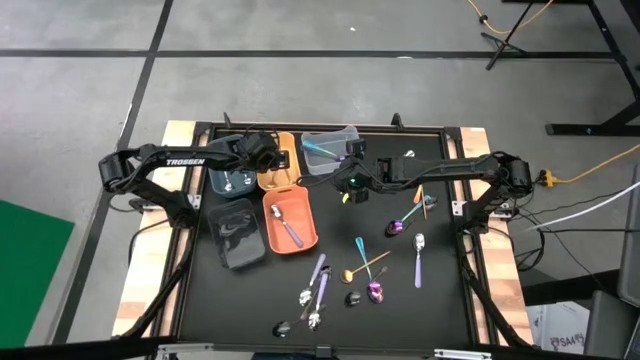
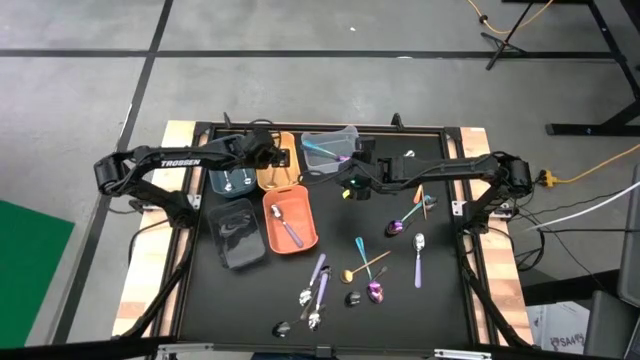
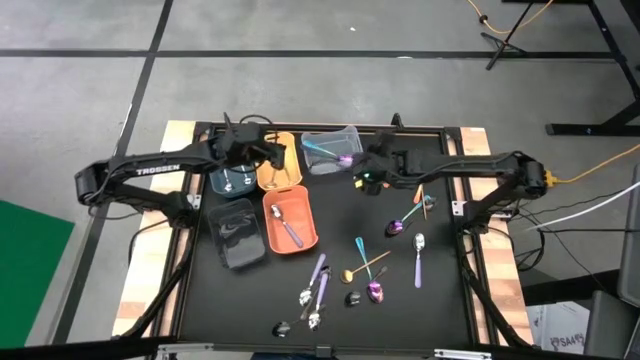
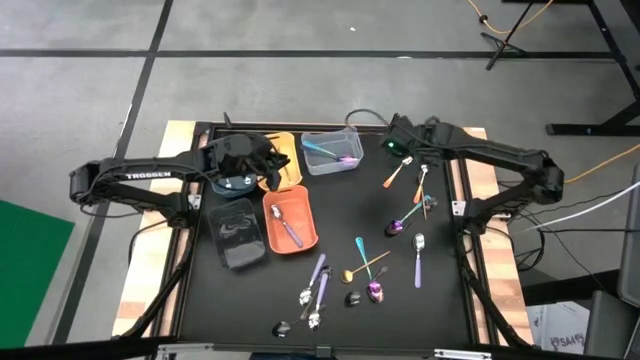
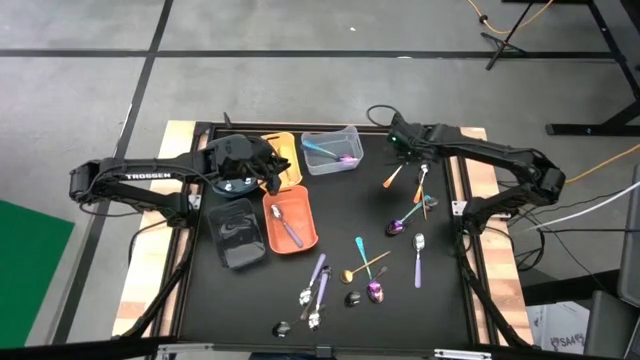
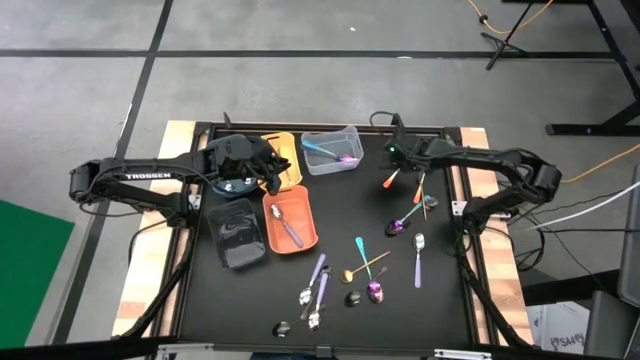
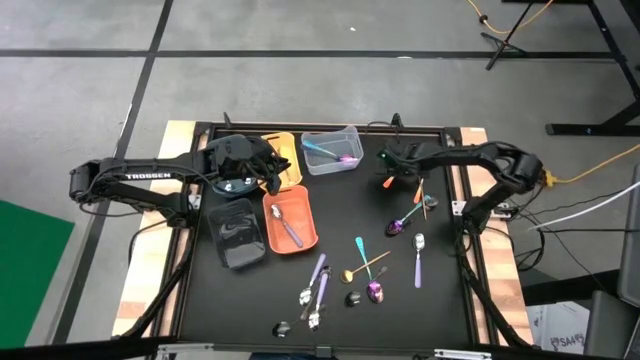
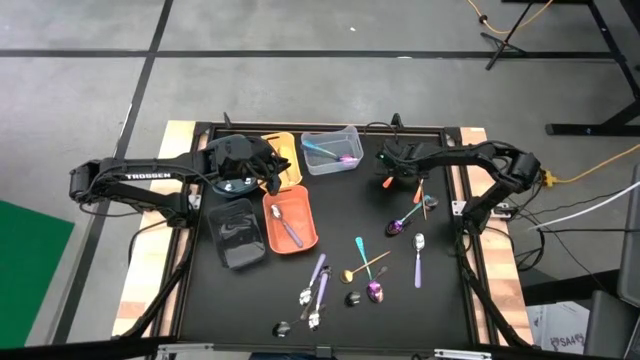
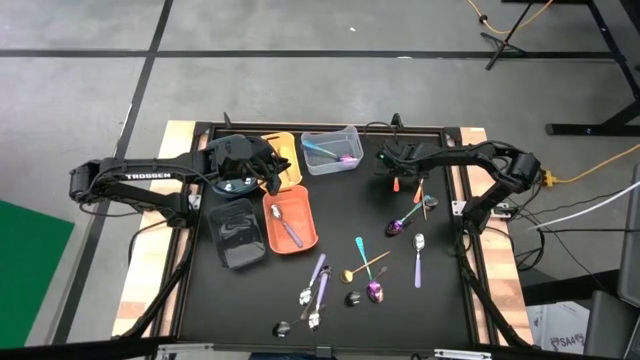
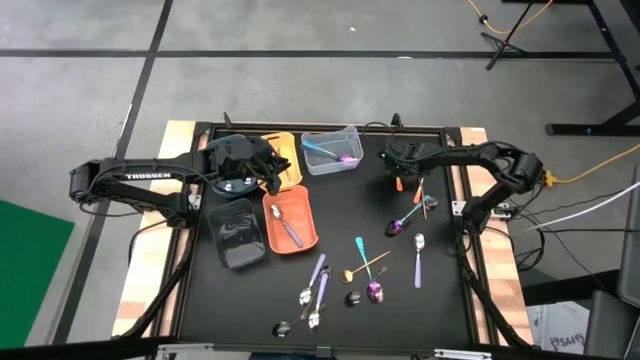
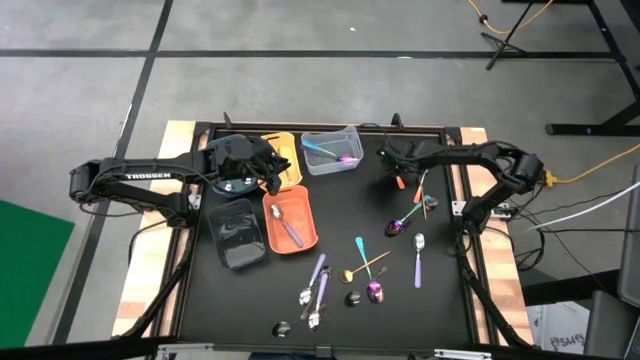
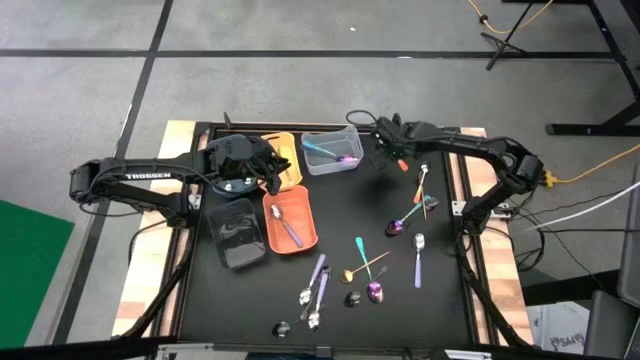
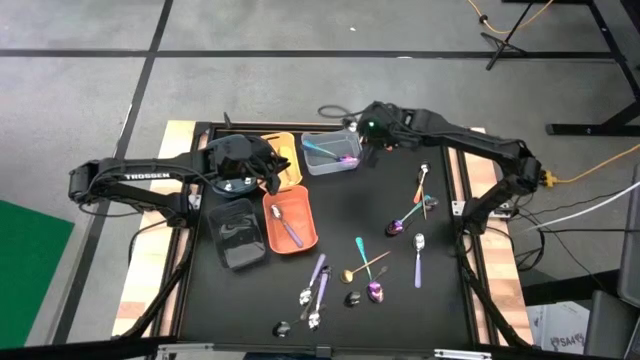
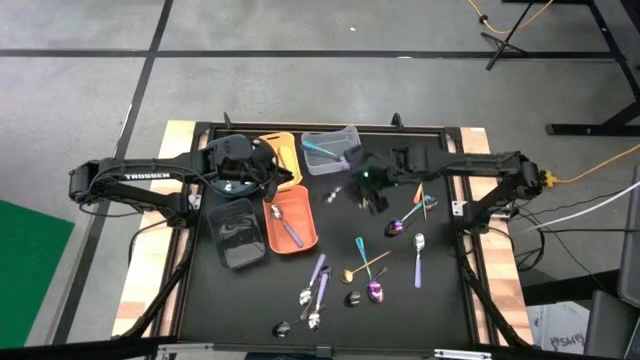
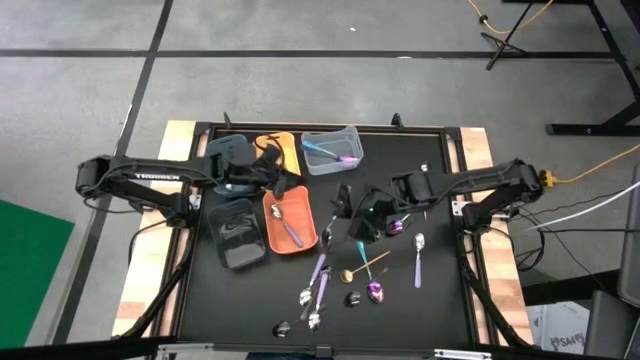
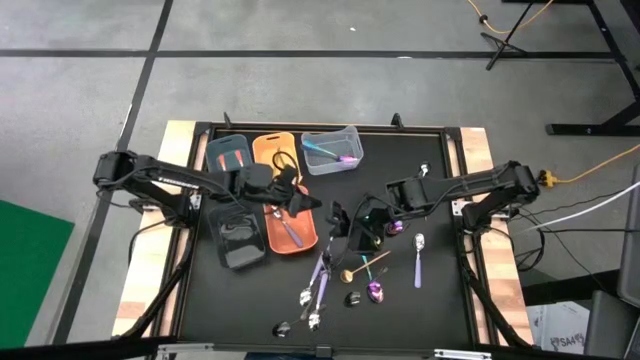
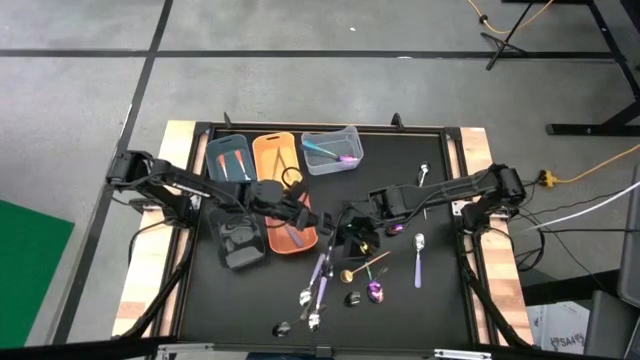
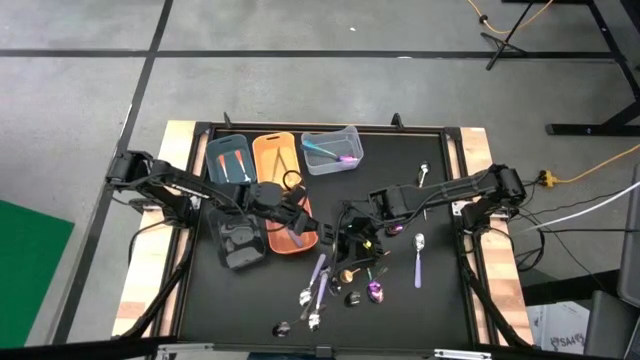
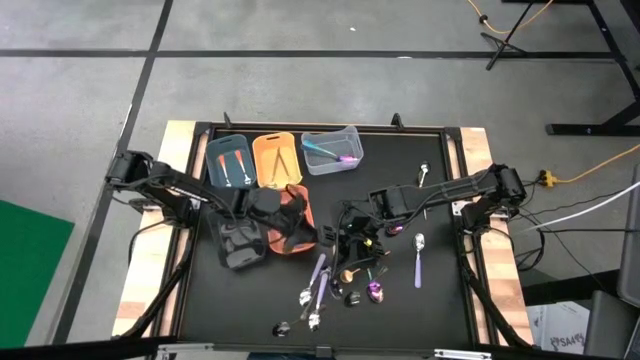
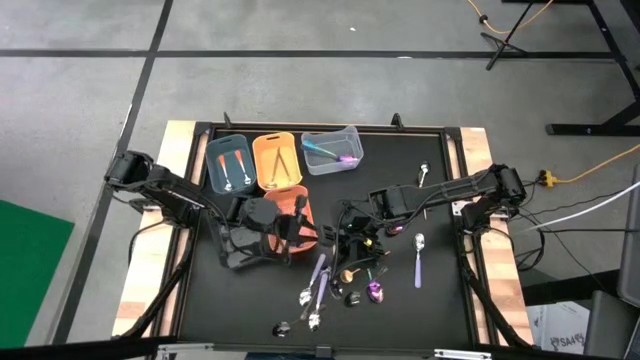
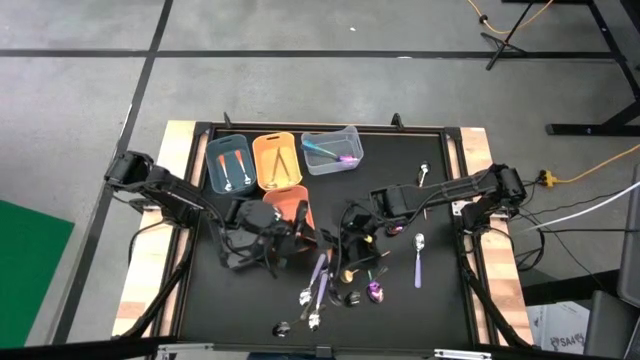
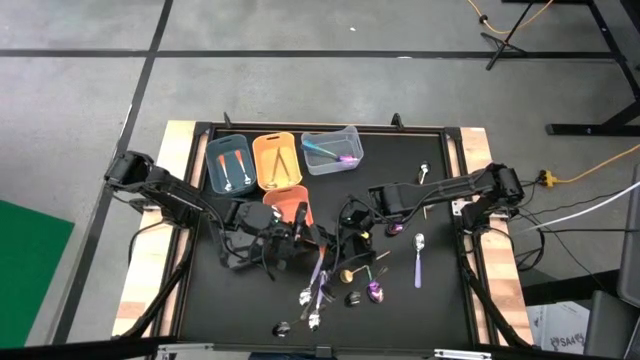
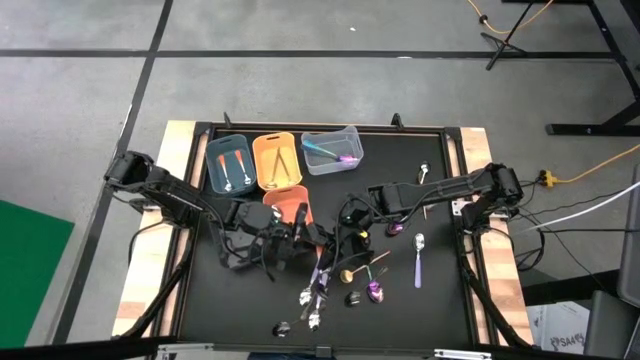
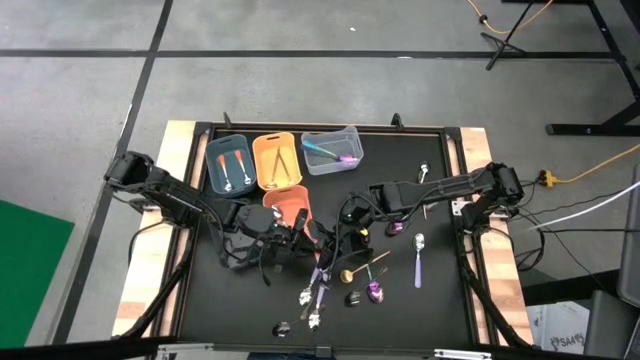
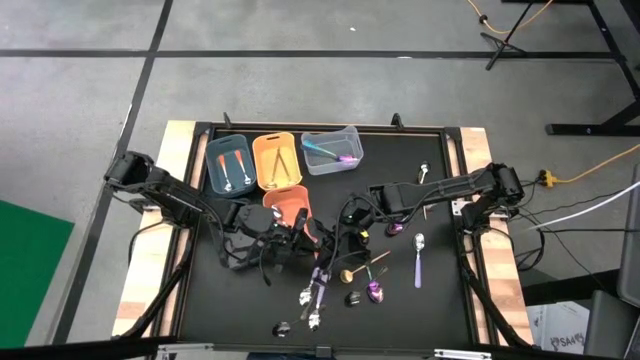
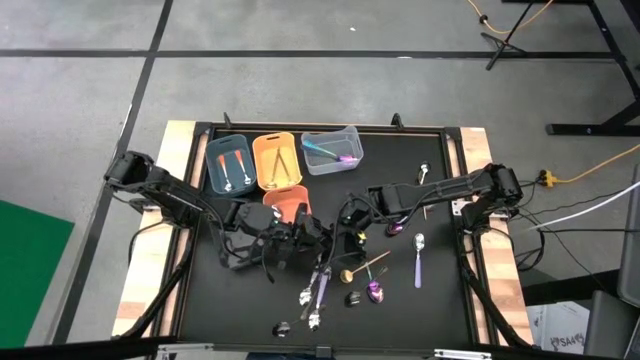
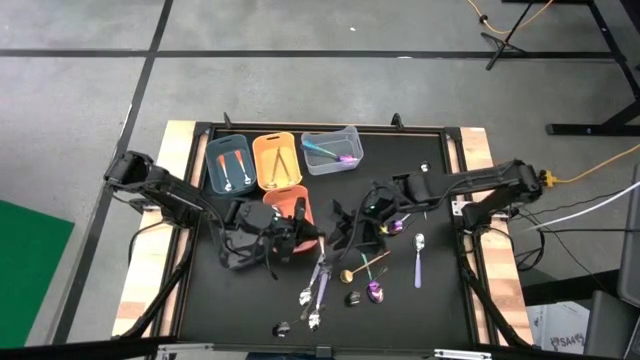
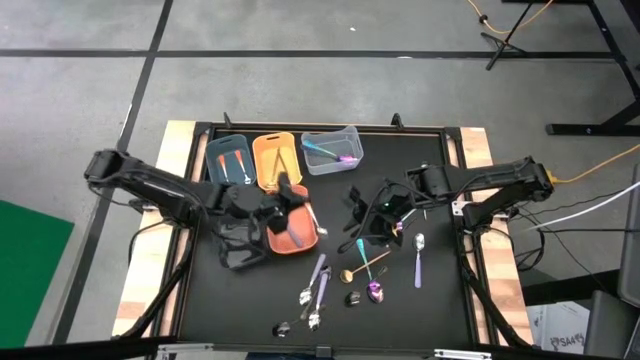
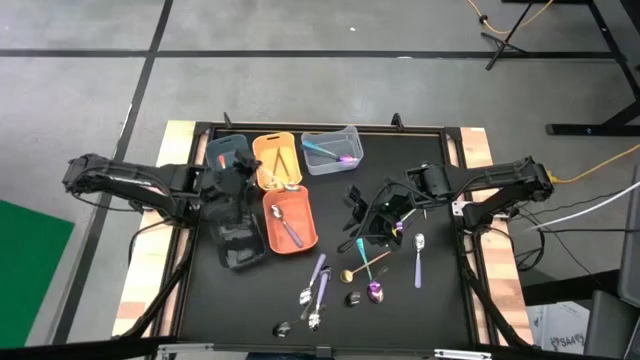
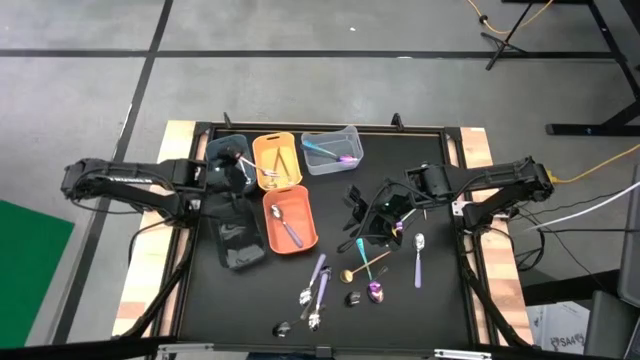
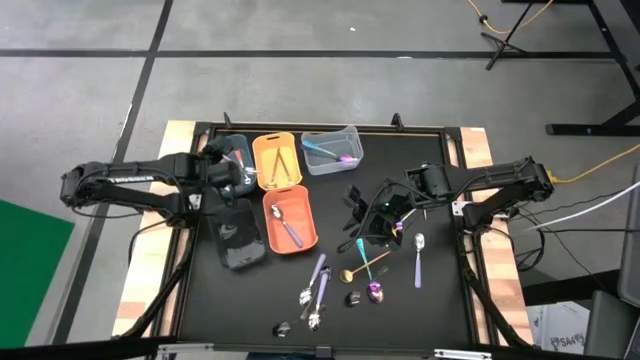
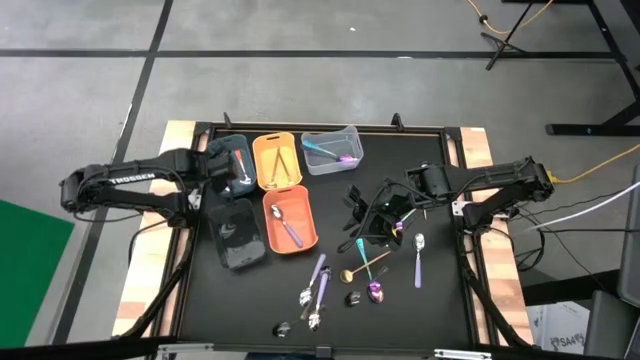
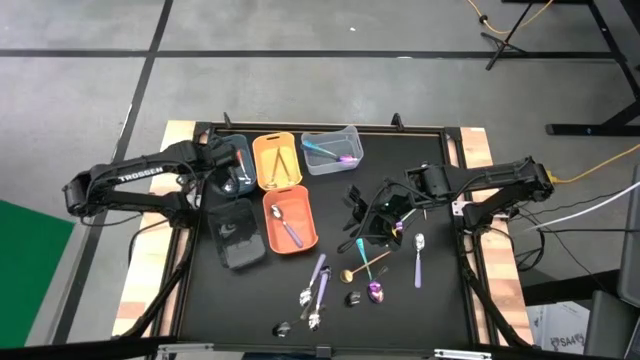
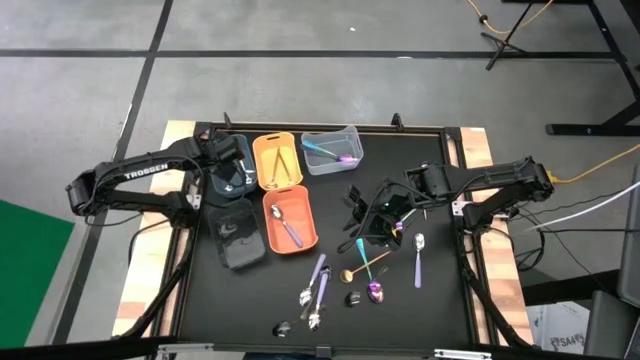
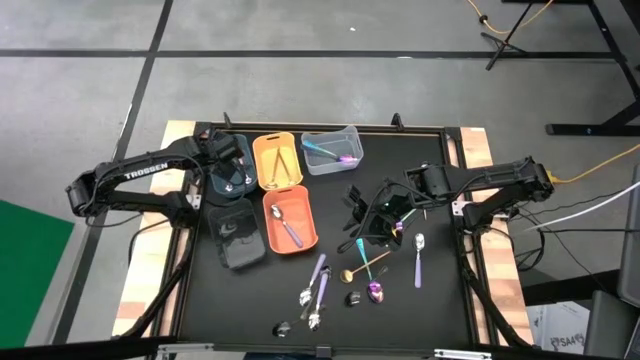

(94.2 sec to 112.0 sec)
Task: Sort silverware by color (type)
Put the orange spoon into the blue bin
